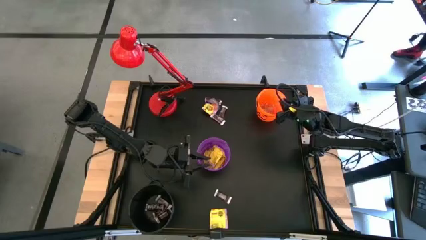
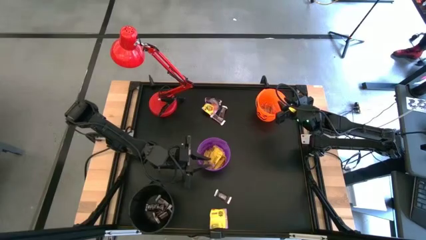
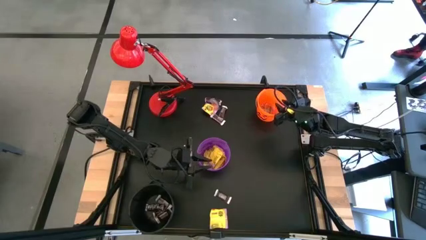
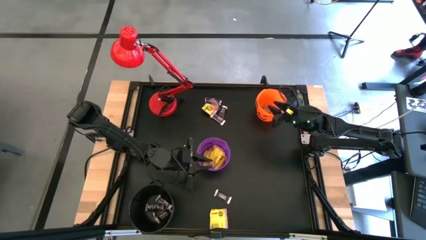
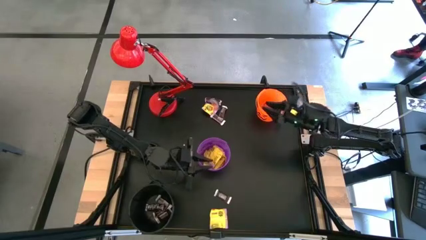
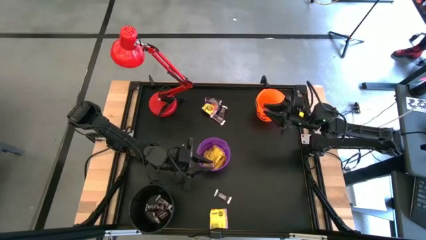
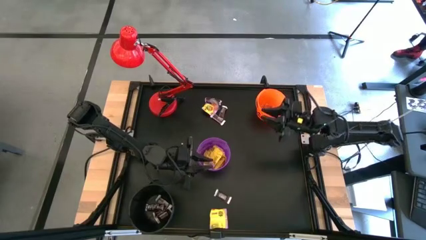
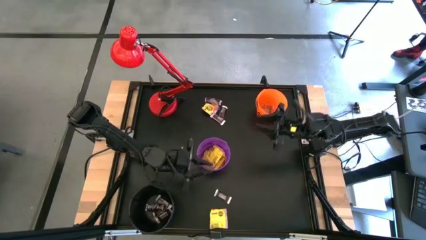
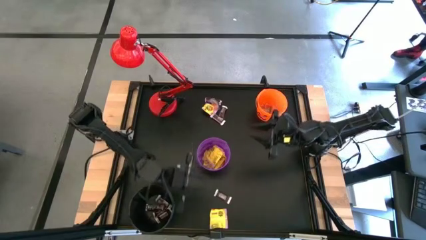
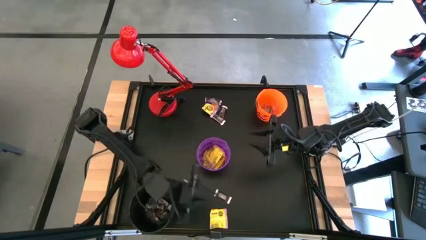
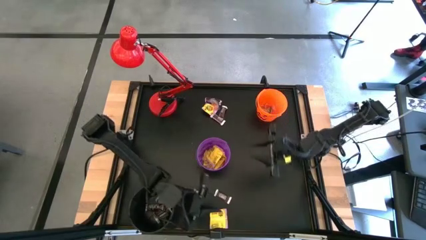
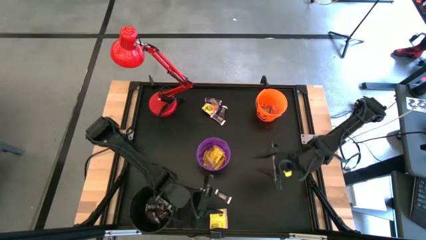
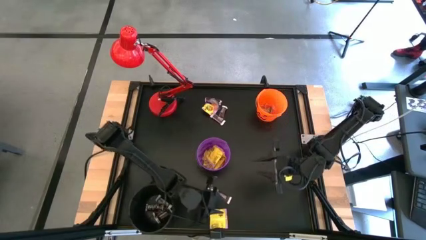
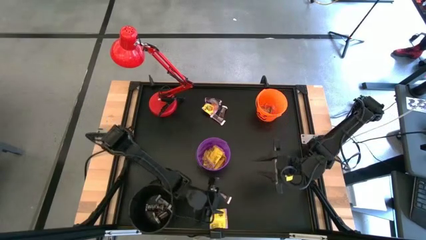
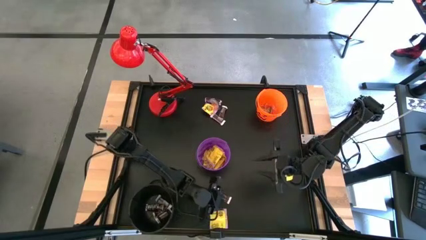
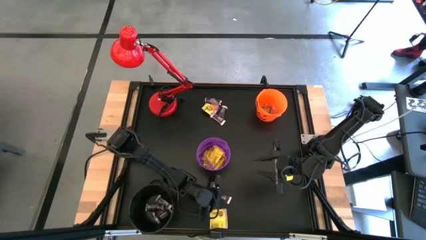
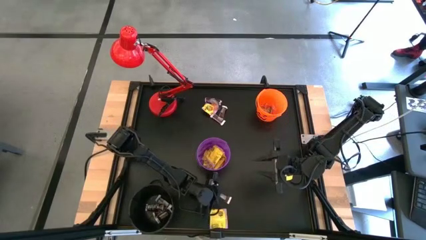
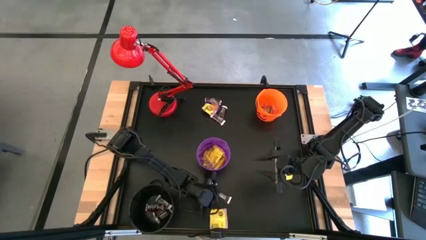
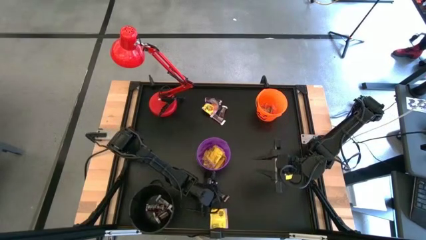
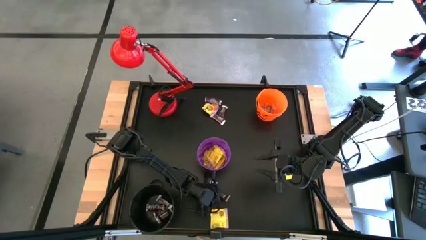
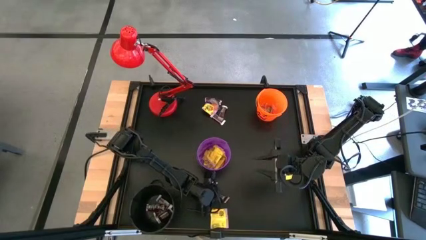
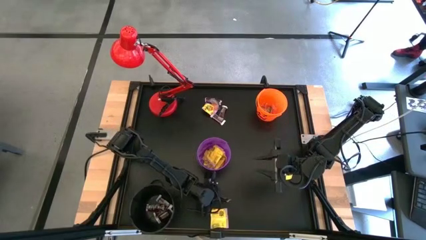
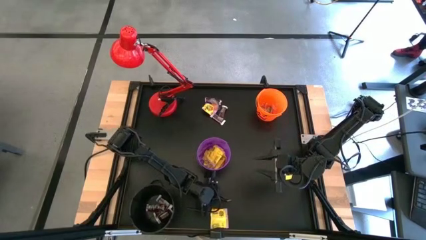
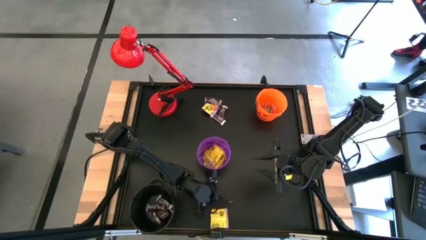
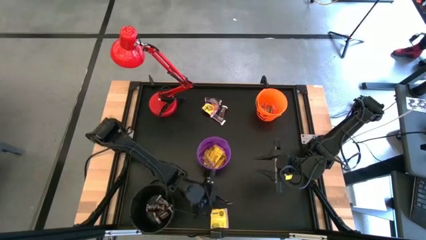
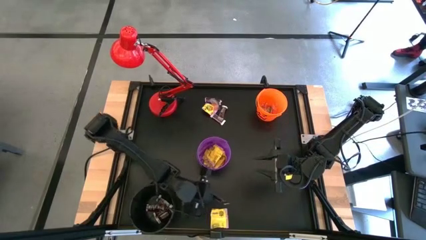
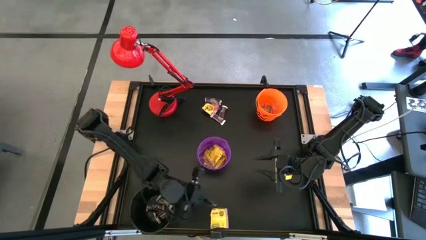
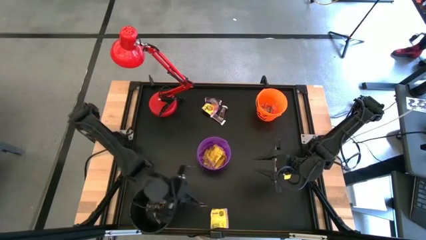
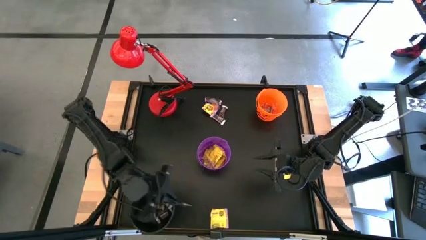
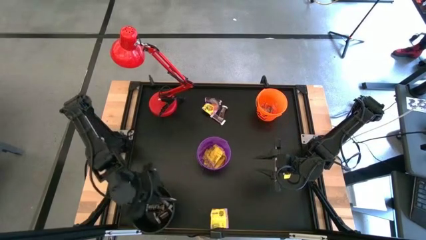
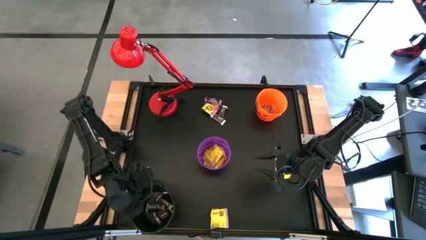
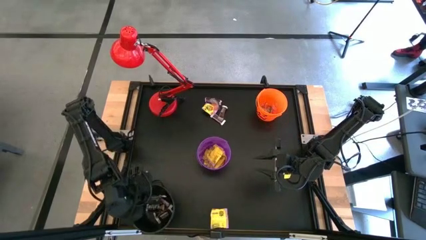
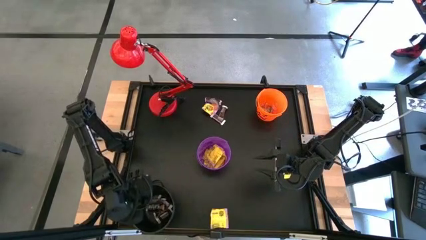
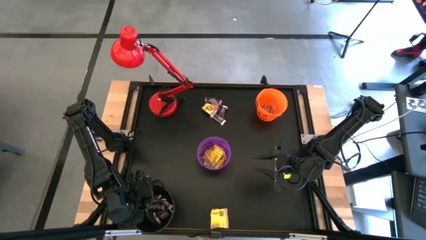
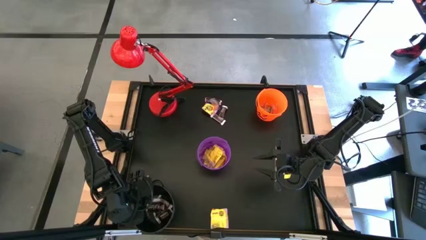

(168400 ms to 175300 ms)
Task: Sort candy
Put the brown chocolate bar into the black bucket

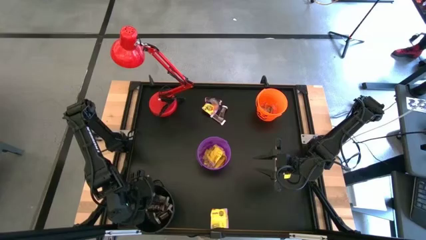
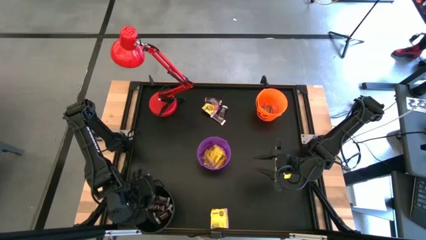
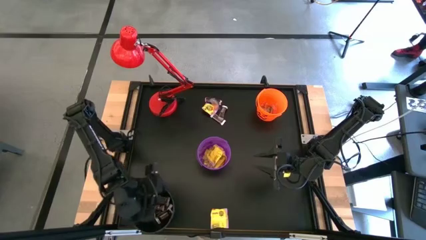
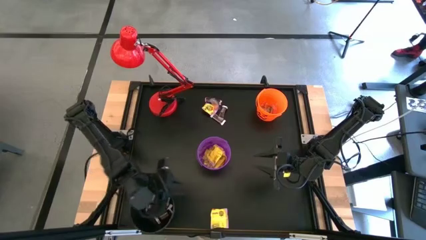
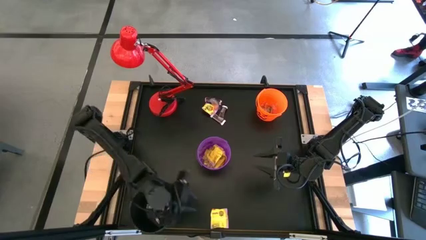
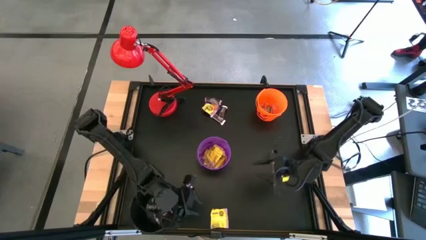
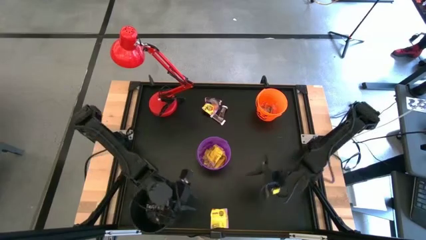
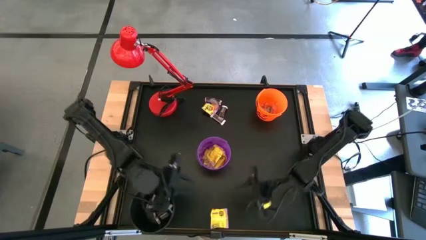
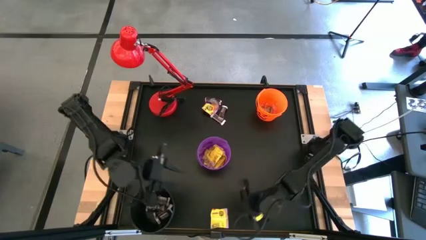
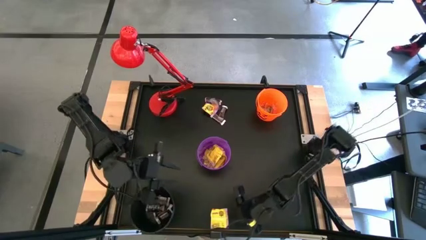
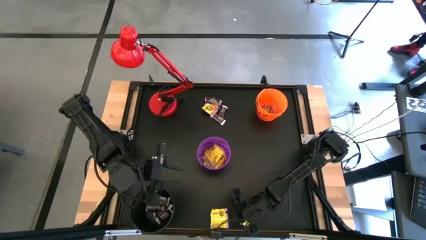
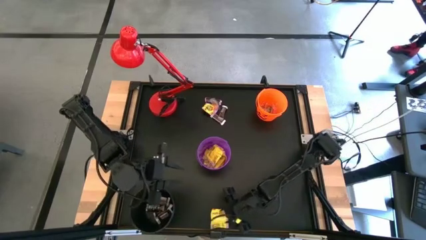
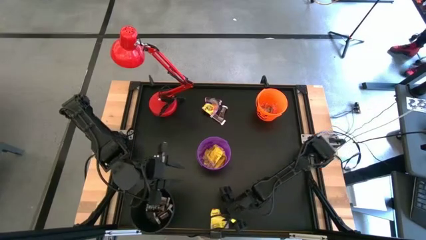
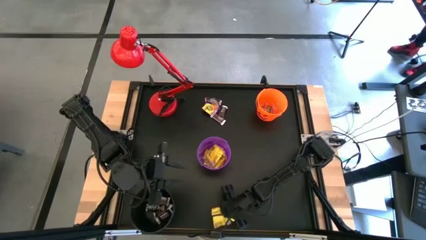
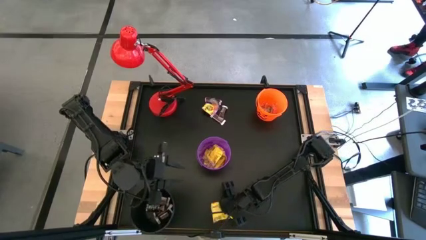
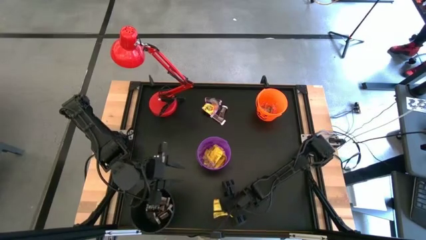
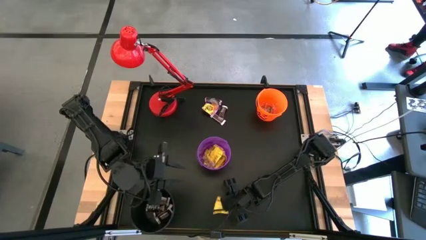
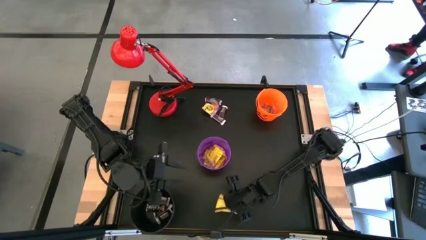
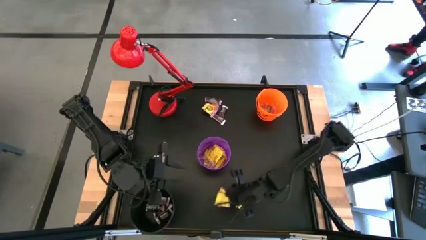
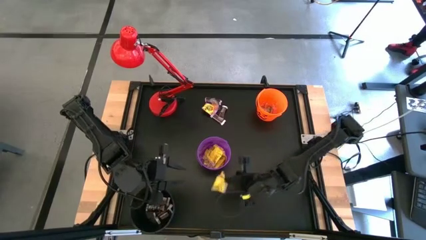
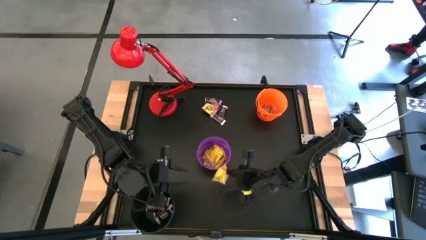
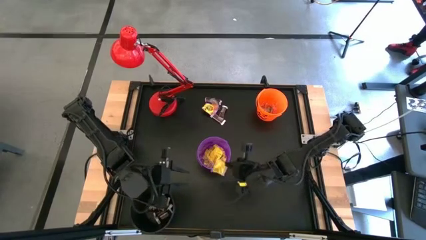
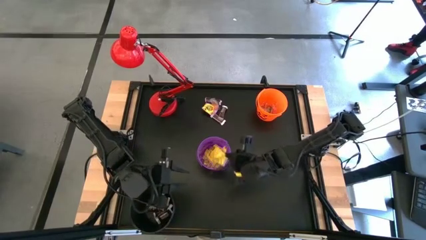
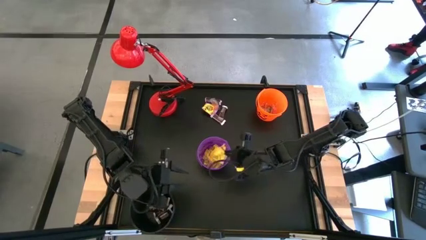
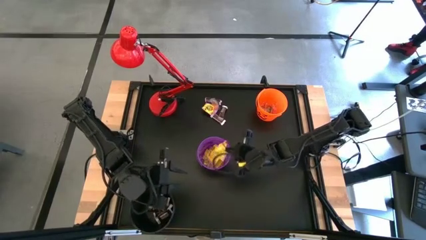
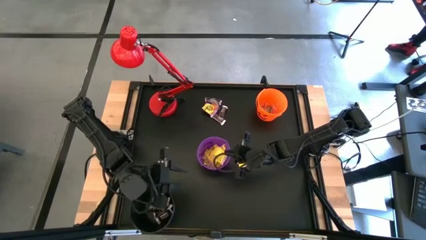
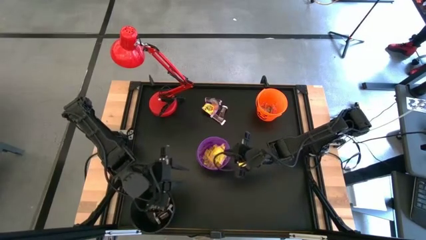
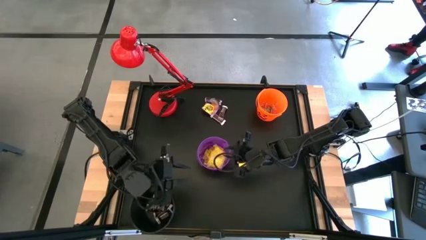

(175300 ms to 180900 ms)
Put the yellow candy into the purple bucket

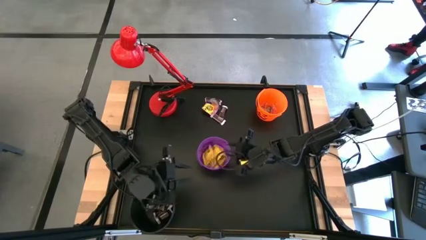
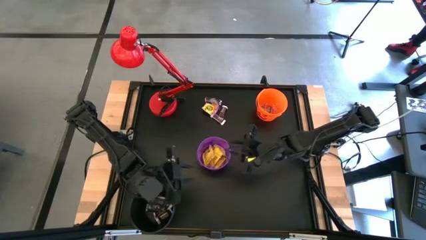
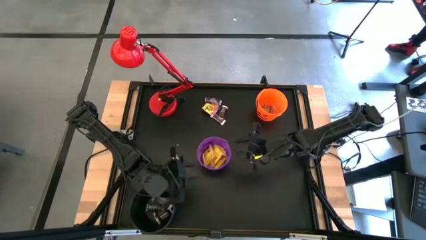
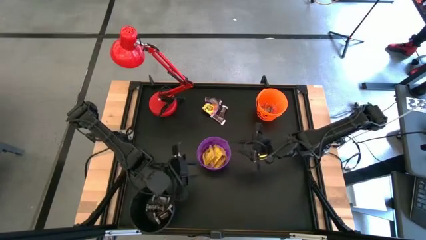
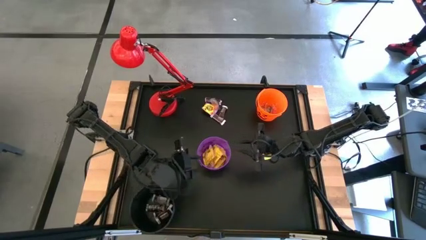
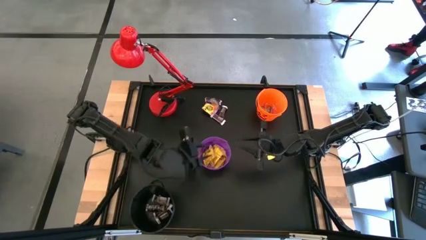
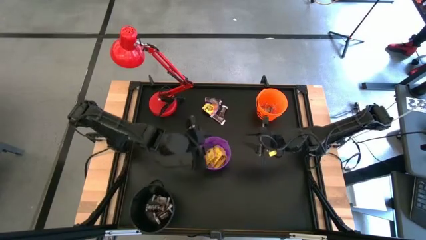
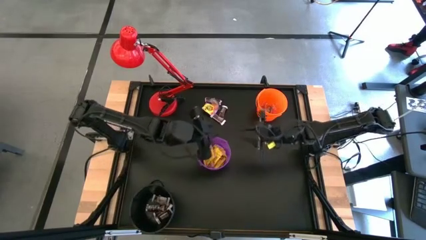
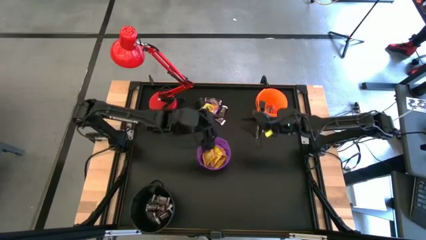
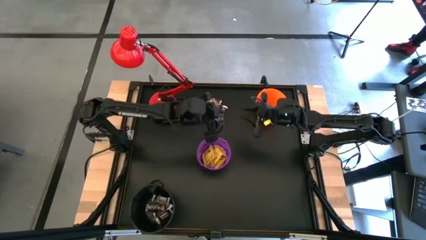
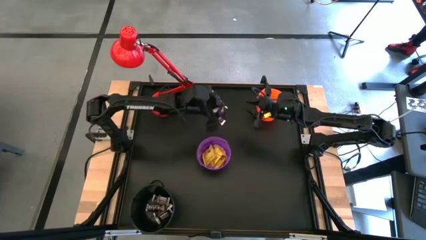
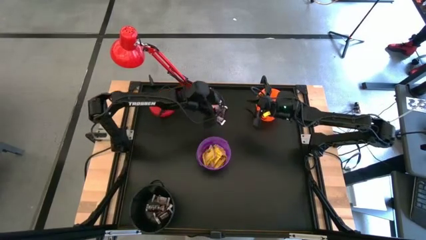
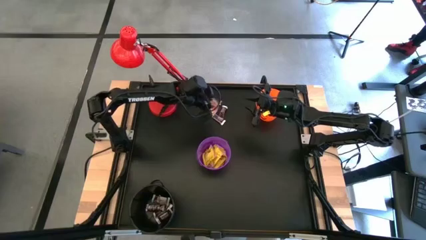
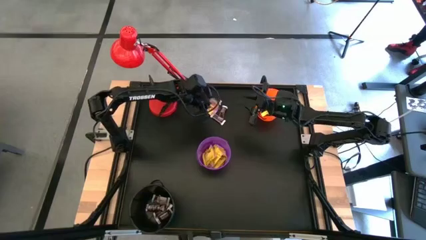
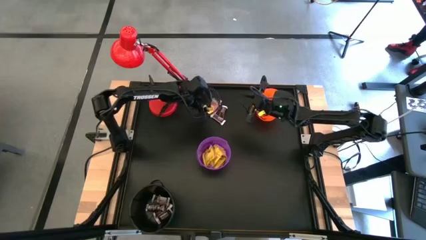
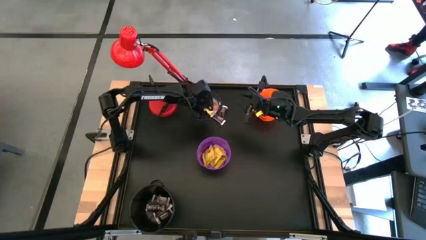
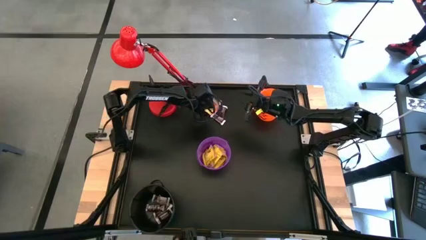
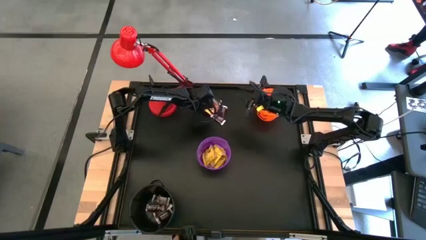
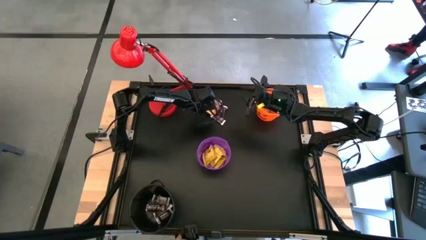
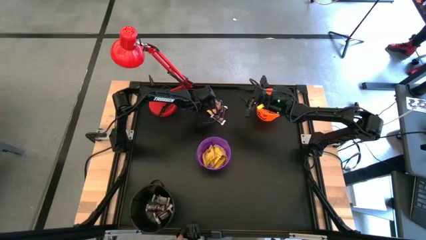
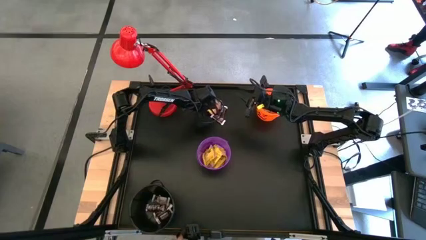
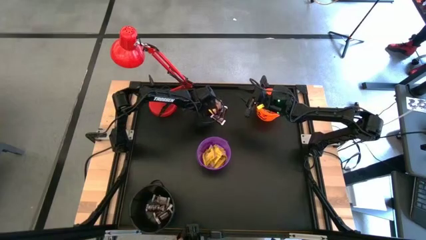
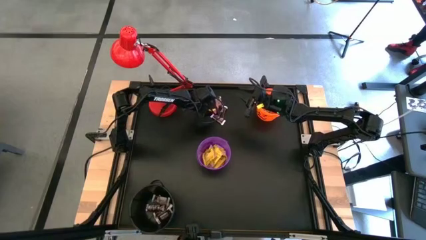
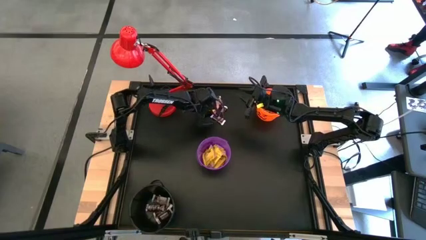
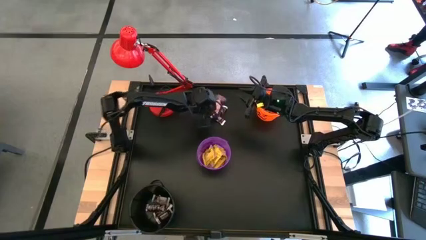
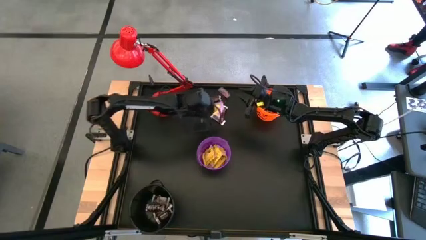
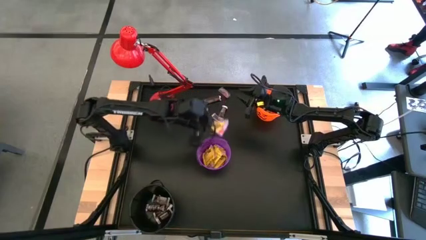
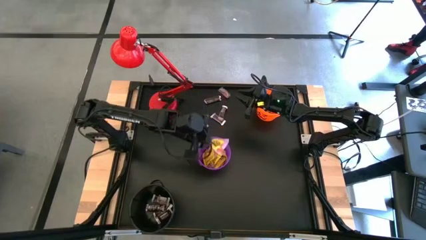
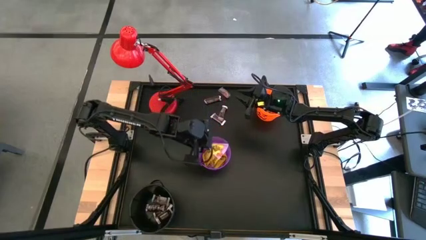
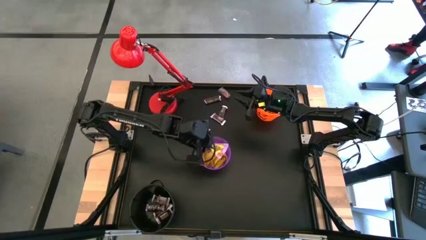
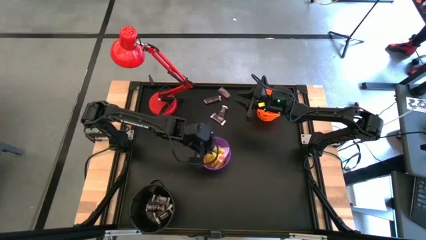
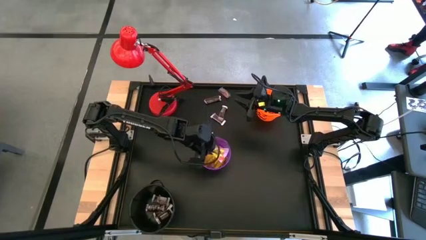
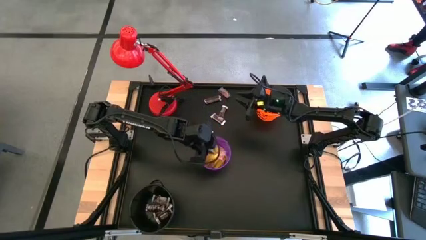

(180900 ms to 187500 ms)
Put the yellow candy into the purple bucket
